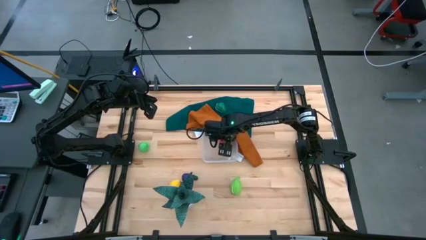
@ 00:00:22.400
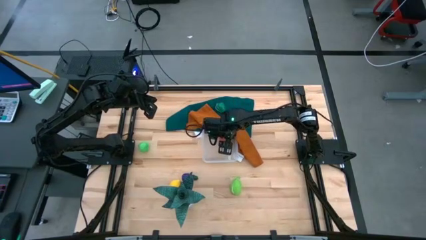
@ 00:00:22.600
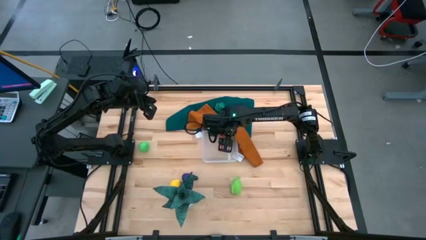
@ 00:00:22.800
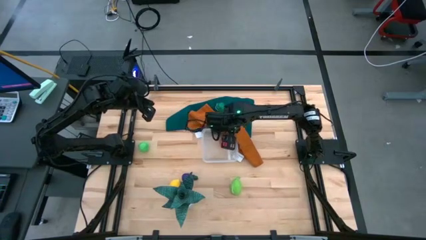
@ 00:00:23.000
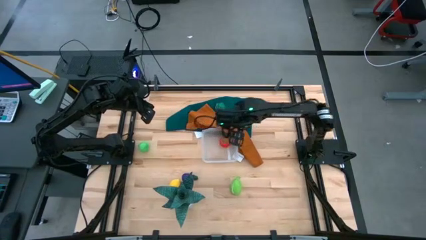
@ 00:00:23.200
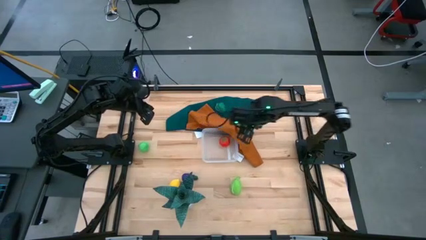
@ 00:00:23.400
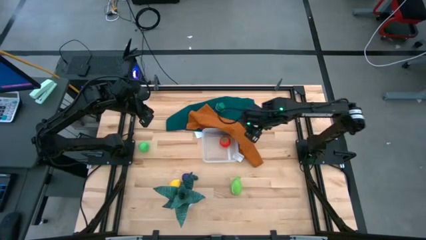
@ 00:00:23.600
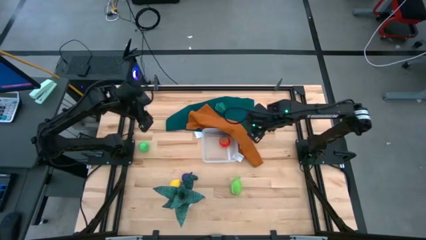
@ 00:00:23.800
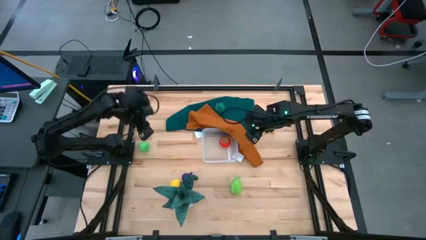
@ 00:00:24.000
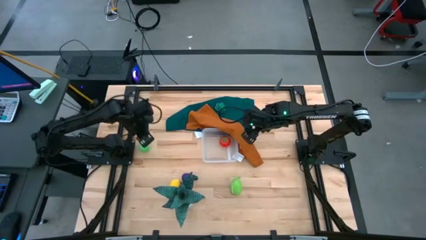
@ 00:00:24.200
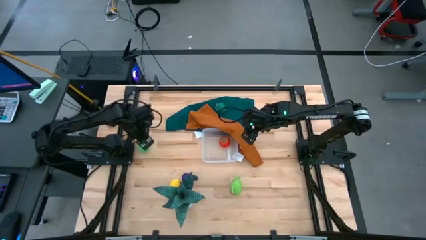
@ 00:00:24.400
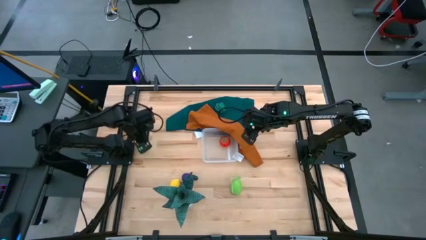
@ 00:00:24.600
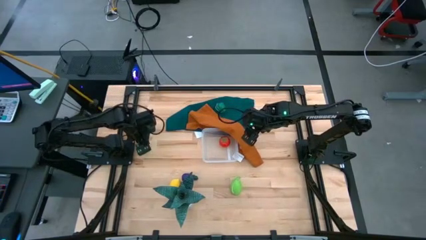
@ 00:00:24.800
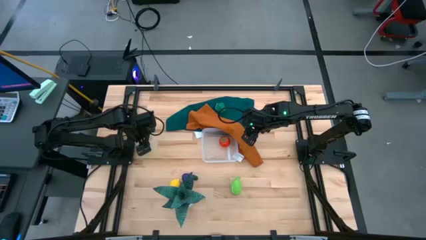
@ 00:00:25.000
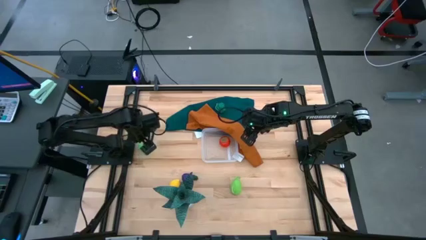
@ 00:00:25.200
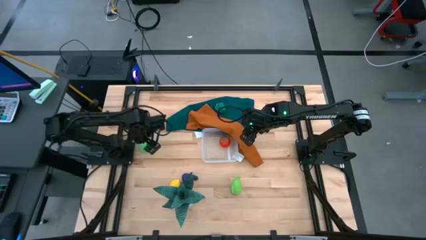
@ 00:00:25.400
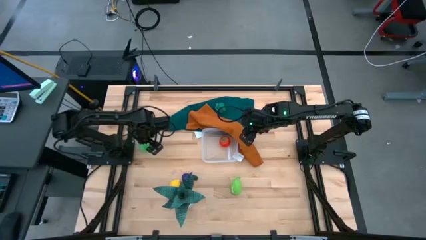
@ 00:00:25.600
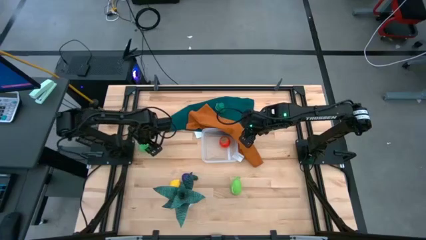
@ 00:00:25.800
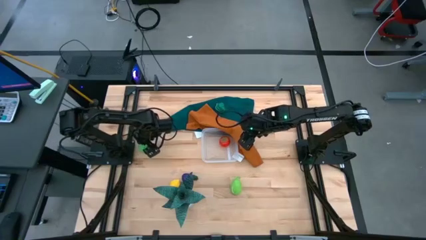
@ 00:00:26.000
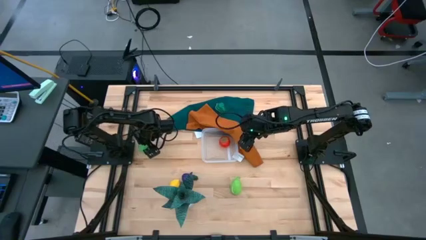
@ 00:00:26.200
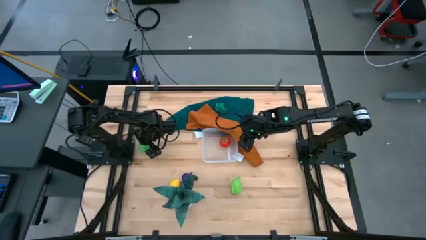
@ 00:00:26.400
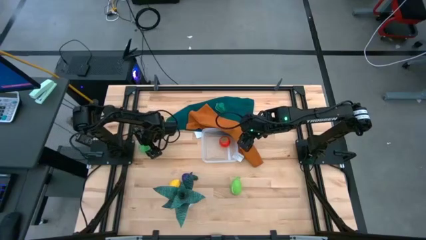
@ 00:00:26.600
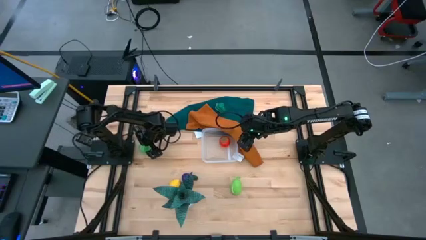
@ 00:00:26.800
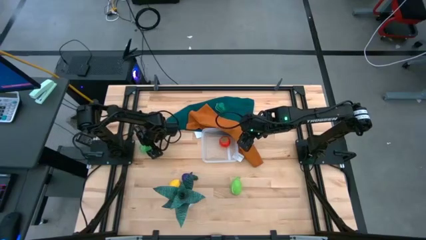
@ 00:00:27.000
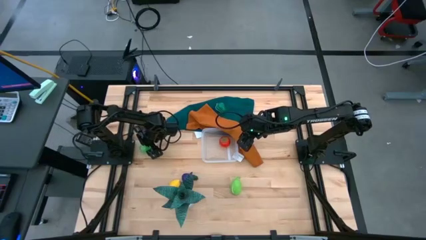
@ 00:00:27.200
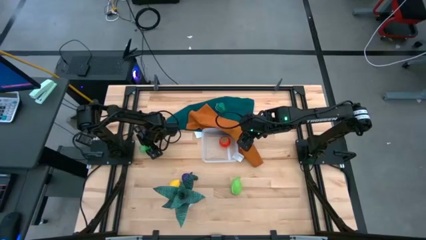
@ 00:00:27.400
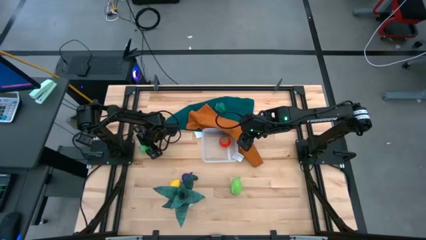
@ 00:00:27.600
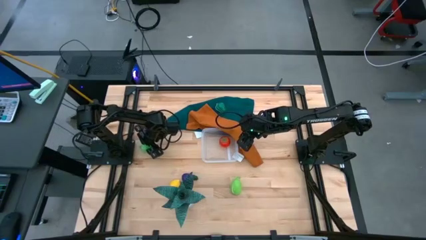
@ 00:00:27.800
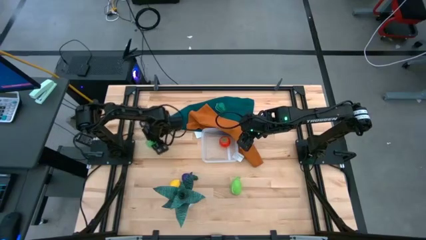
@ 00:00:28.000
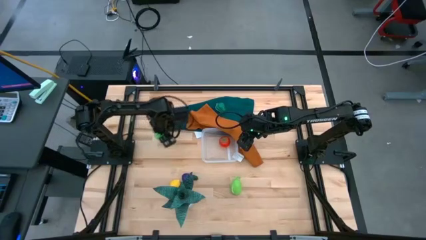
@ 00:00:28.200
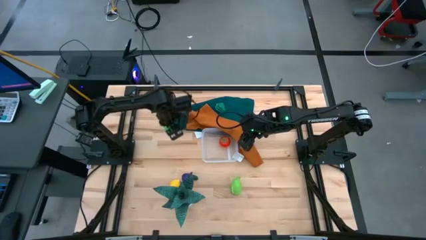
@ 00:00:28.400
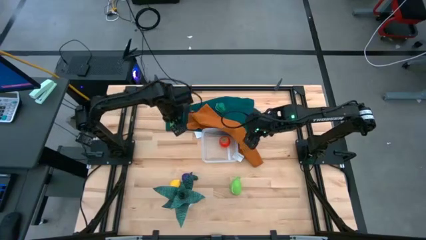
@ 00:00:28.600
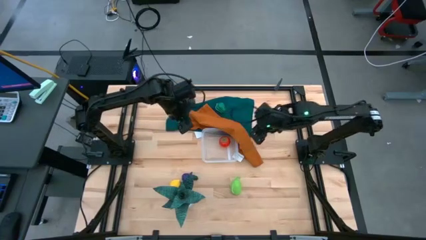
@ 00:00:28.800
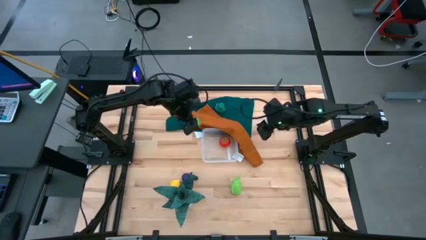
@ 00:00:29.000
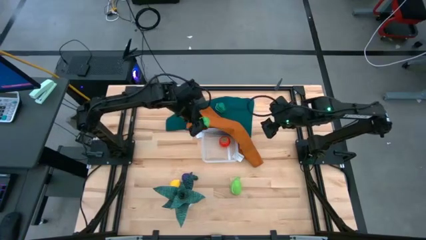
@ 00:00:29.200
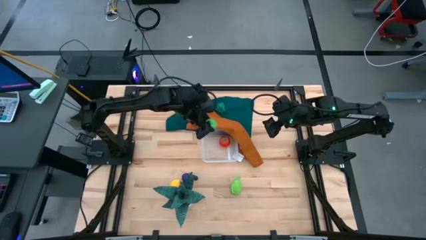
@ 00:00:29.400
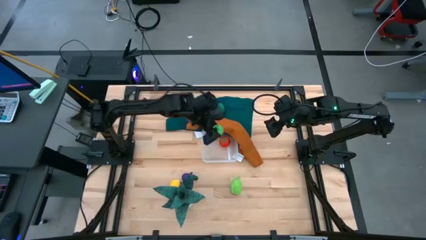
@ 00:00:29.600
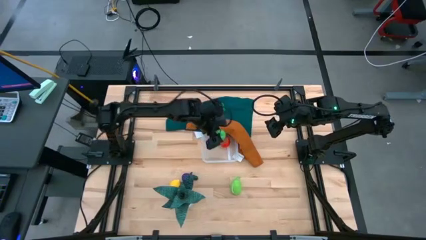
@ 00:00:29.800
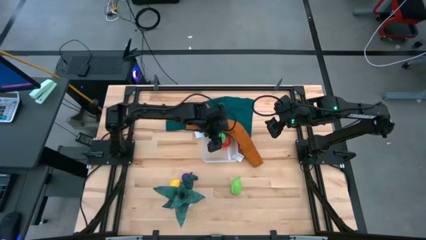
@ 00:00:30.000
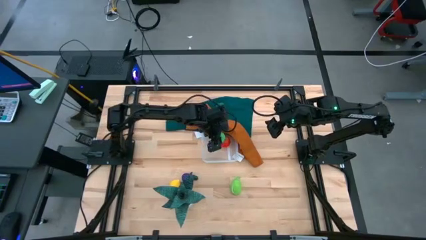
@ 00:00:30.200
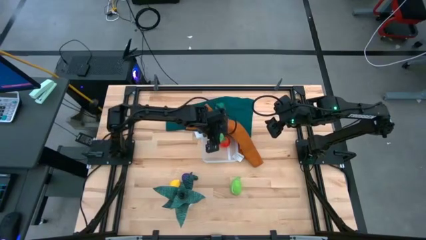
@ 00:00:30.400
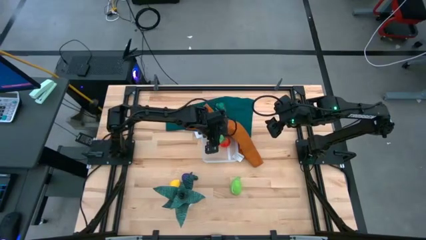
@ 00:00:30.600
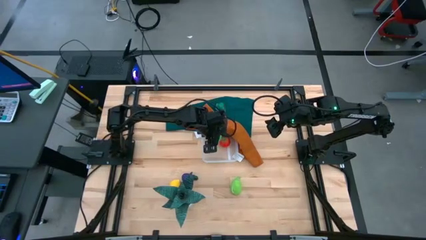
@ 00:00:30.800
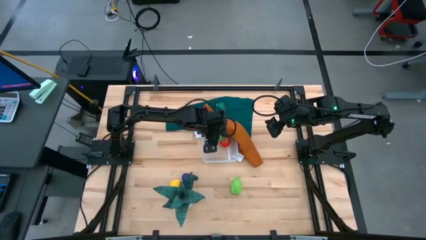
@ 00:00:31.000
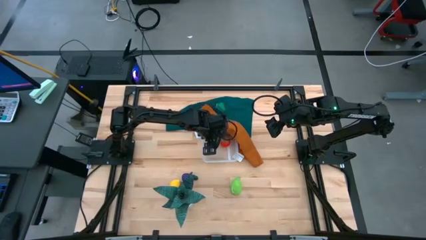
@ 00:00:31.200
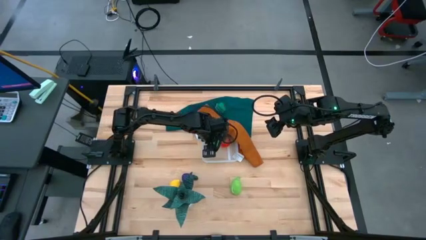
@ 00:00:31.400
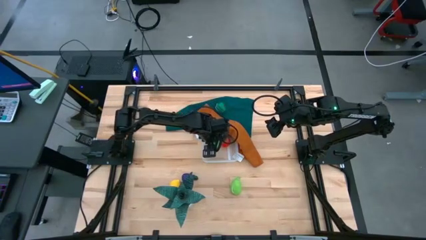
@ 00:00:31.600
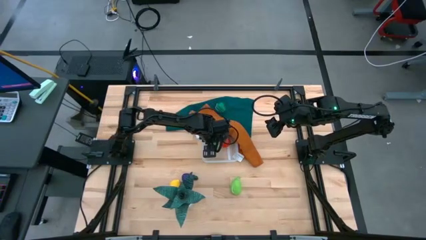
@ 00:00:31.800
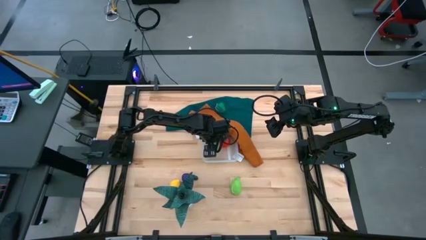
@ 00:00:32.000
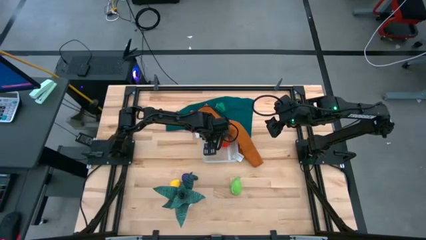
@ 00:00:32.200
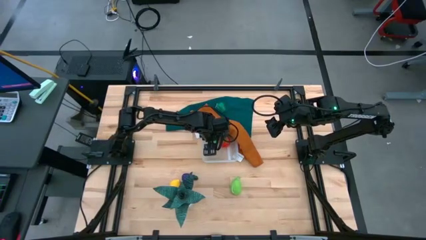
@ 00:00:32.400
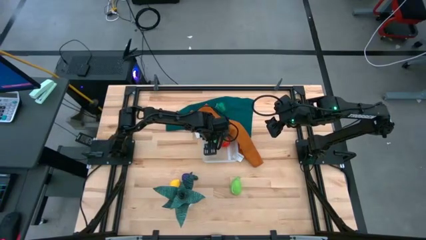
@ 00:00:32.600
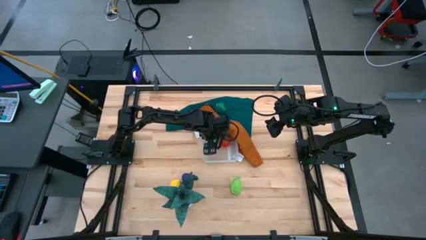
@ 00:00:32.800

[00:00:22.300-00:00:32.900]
Task: Pick and placing Produce into tupperware
Put the avocado into the transparent bin

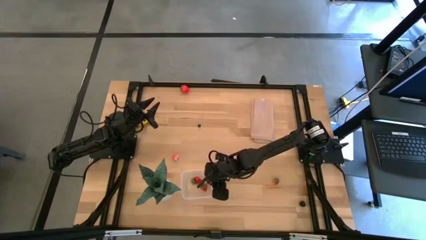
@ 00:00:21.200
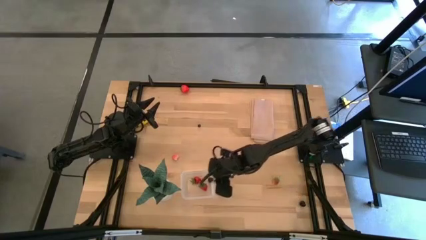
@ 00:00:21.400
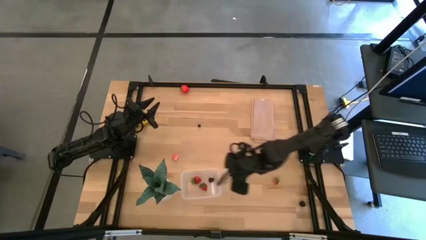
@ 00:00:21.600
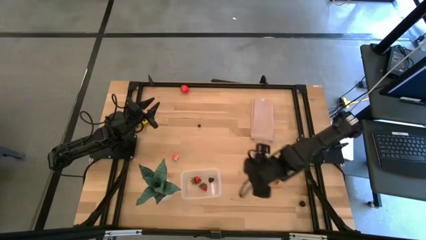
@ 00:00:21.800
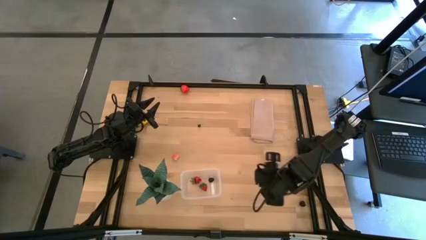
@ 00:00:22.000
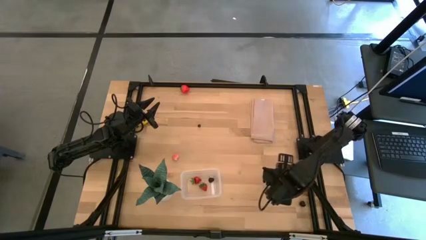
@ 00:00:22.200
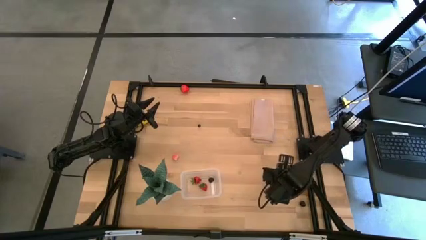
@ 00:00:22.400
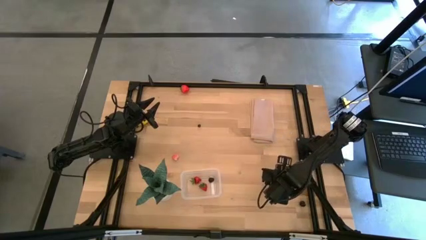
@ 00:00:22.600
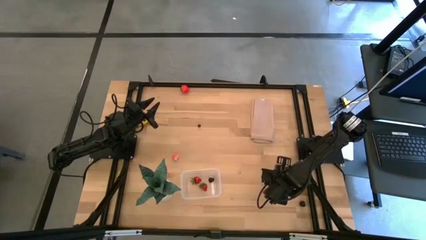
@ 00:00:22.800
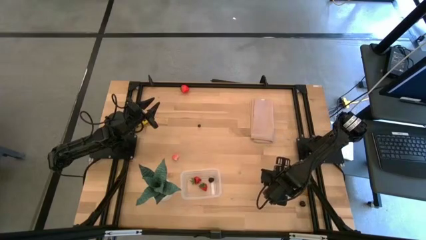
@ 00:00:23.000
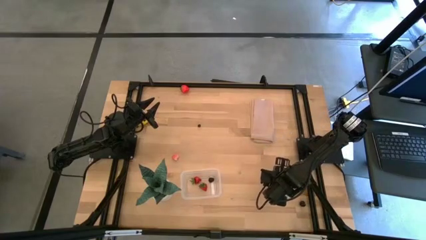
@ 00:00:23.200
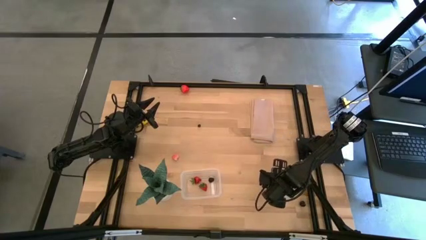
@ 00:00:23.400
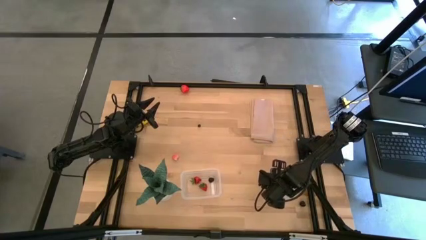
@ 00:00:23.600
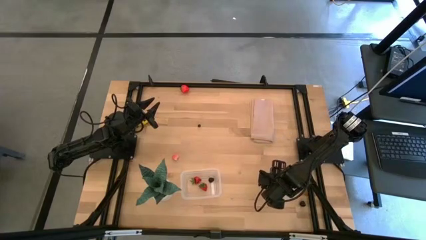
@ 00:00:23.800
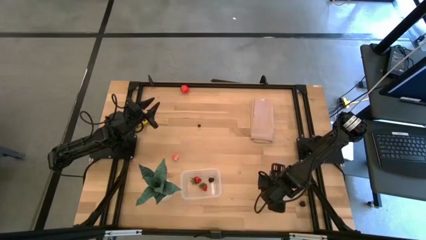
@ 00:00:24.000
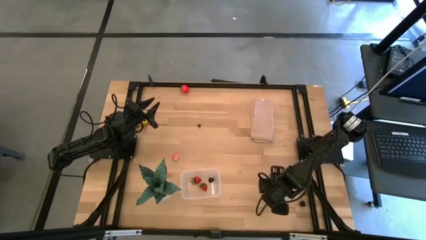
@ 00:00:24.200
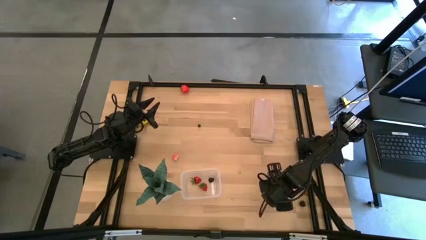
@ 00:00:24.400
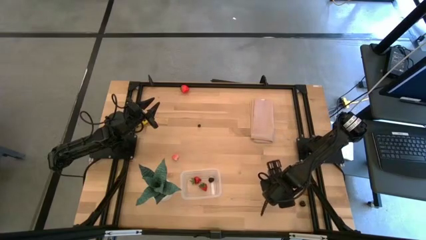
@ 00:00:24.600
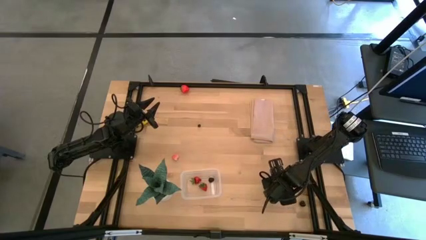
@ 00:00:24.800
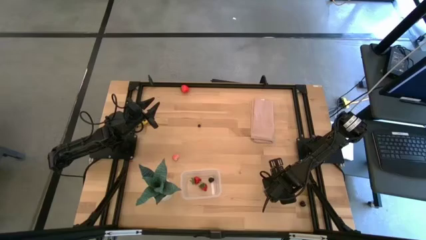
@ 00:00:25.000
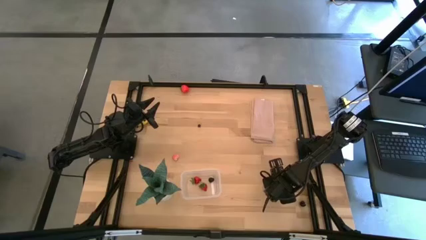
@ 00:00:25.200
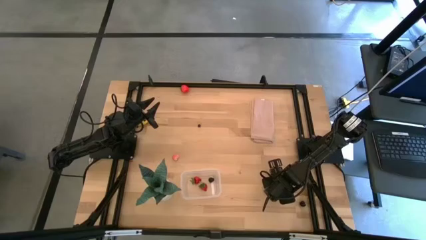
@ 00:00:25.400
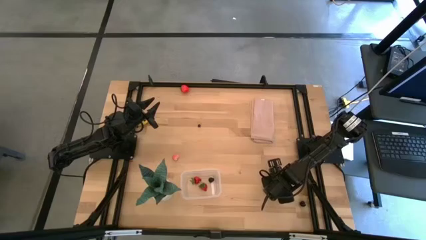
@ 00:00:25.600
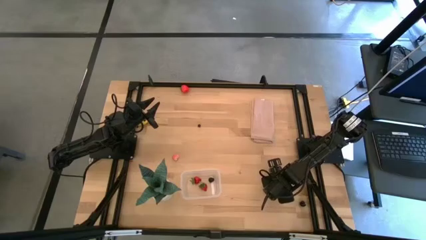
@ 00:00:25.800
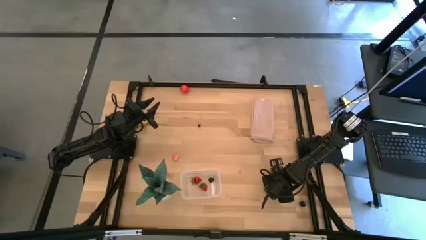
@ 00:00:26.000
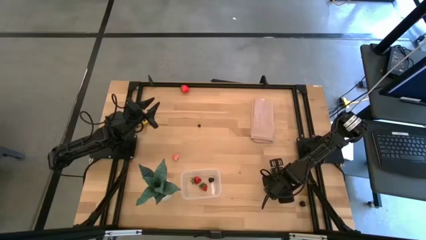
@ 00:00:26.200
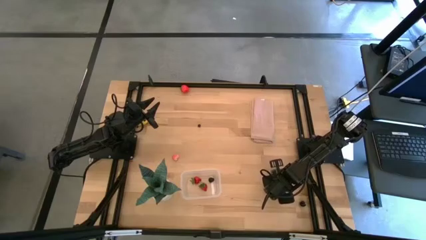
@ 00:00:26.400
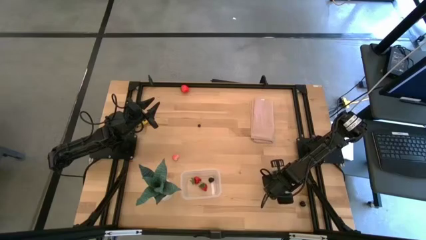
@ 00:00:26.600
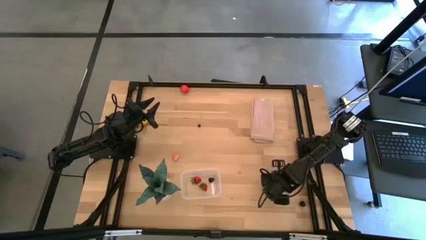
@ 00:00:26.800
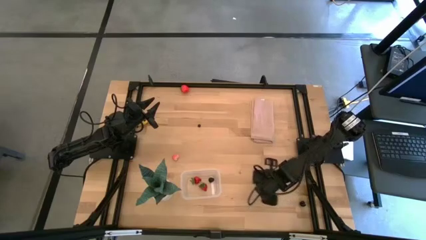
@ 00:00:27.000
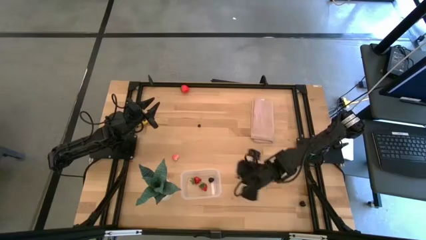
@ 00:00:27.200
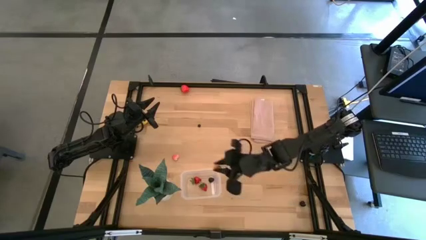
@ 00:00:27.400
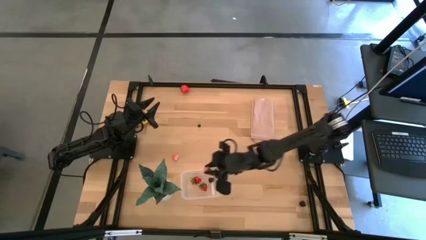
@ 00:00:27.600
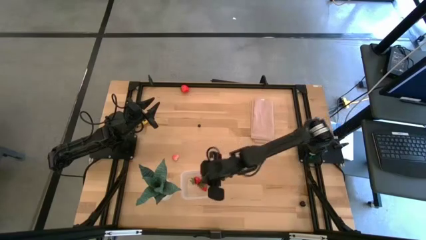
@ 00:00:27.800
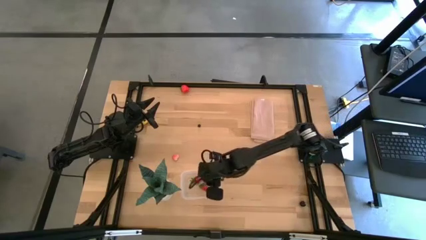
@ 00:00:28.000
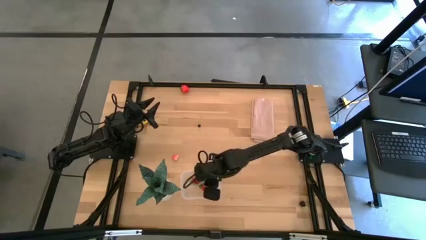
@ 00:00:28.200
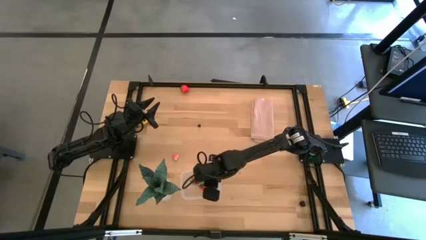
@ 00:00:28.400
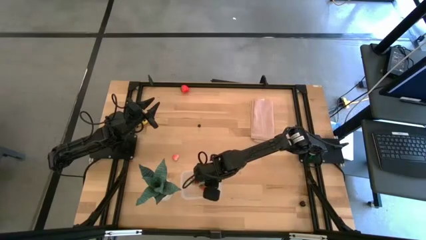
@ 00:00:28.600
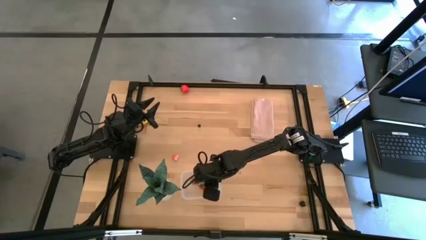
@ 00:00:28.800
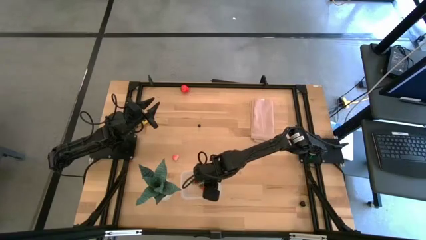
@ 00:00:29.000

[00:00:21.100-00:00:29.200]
Task: Pick and placing Produce into tupperware
Put the bottom red and yellow strawberry into the transparent bin
